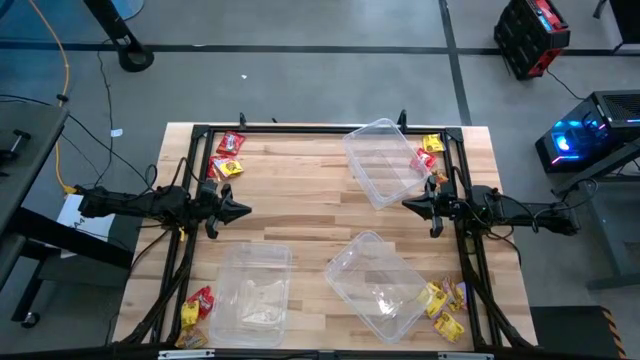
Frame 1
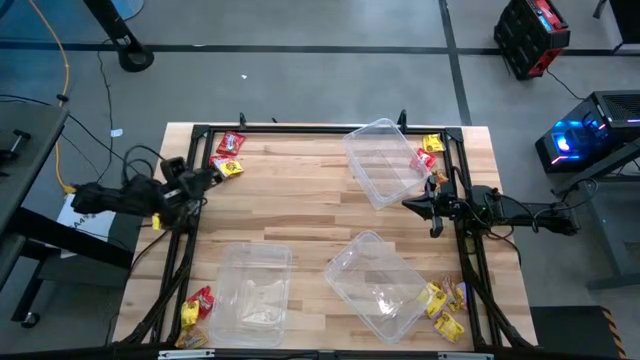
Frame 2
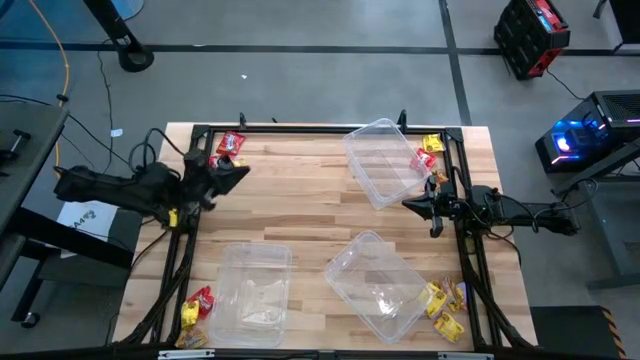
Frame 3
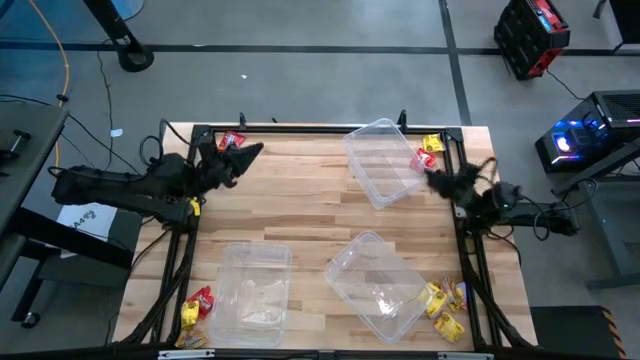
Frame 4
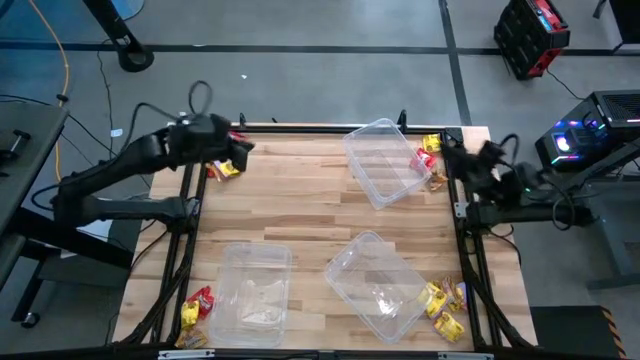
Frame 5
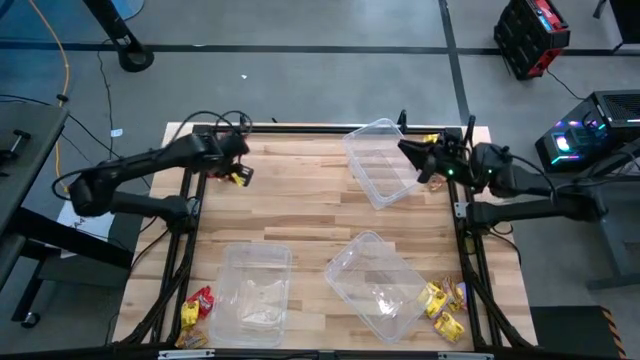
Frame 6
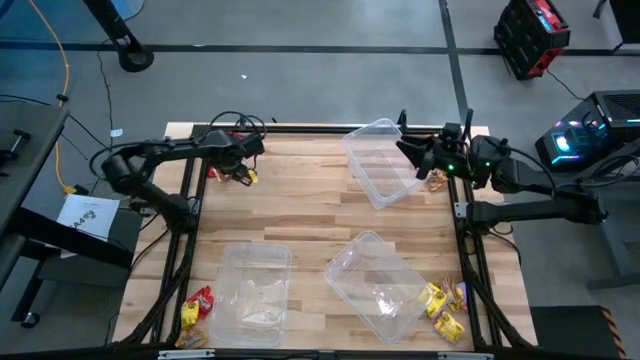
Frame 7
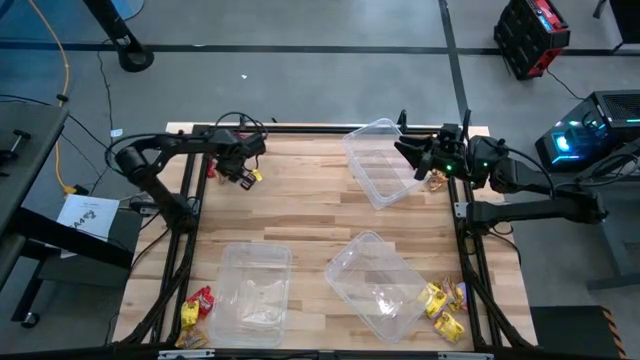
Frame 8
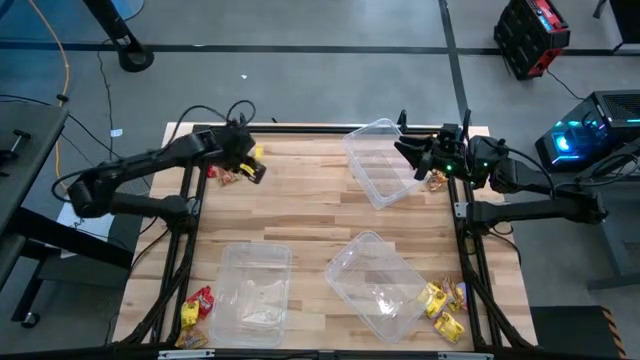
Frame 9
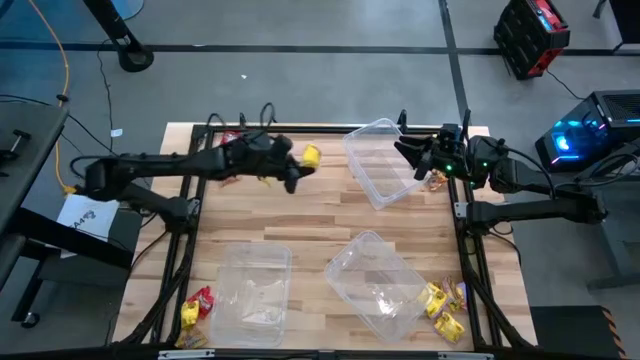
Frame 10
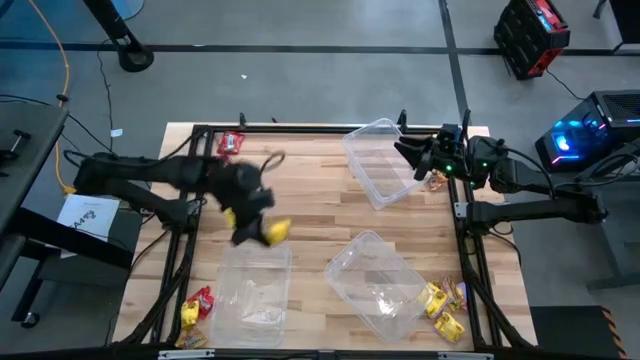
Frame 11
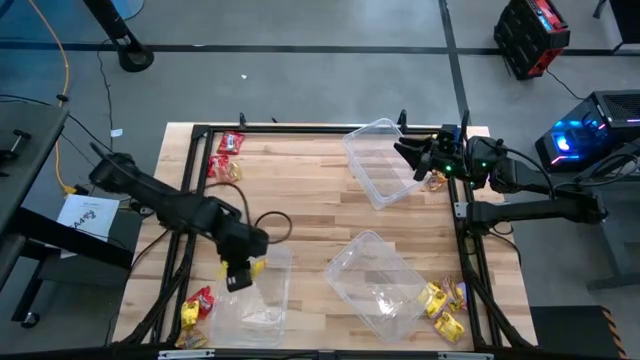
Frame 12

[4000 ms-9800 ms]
Task: Sort candy
Put the yellow candy into the bottom left transparent bin

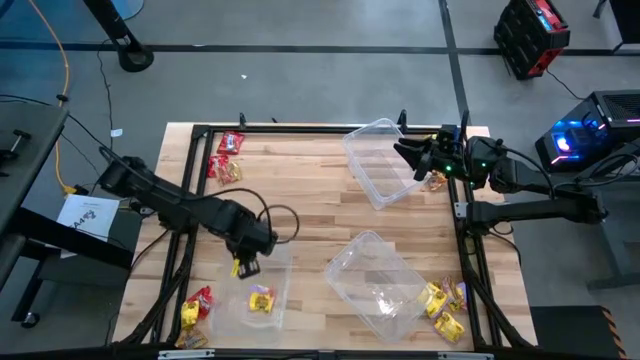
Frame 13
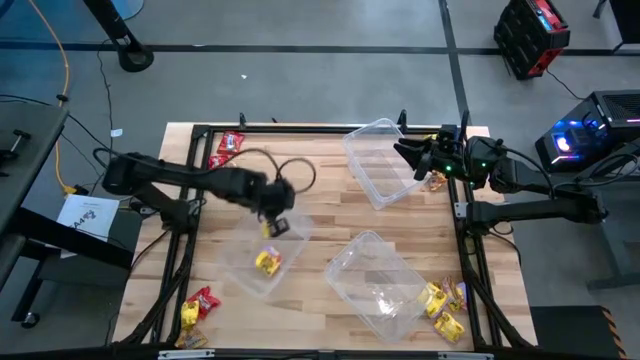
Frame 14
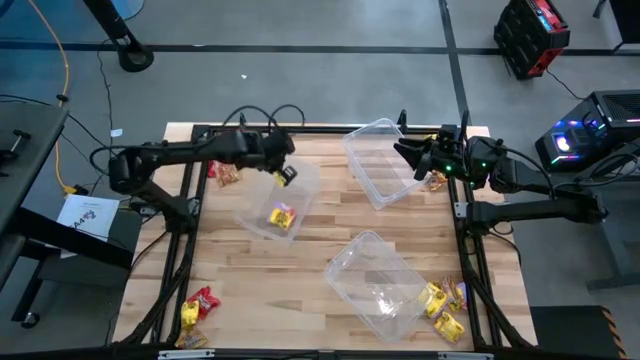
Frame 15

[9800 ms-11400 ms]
Move the bottom left transparent bin to the top left on the table

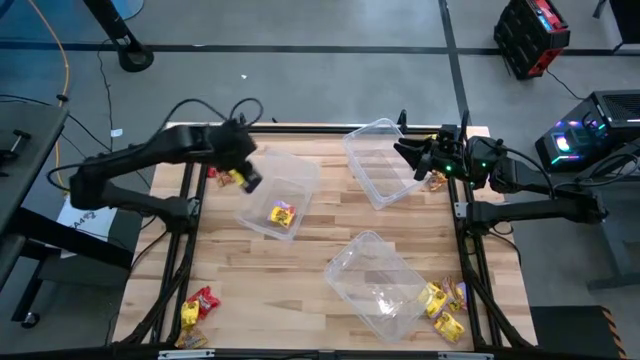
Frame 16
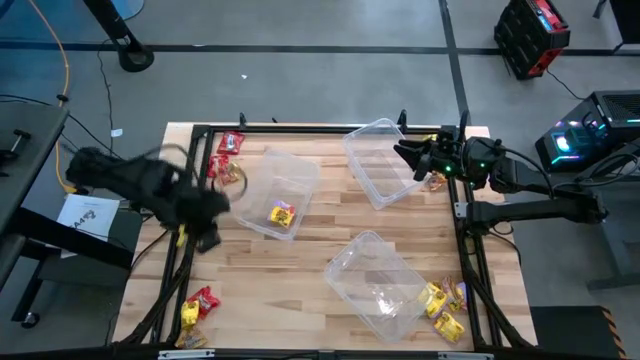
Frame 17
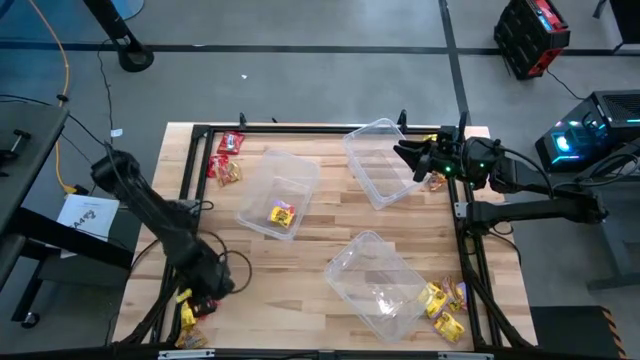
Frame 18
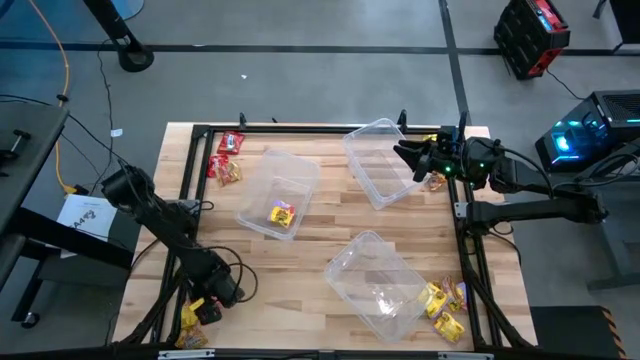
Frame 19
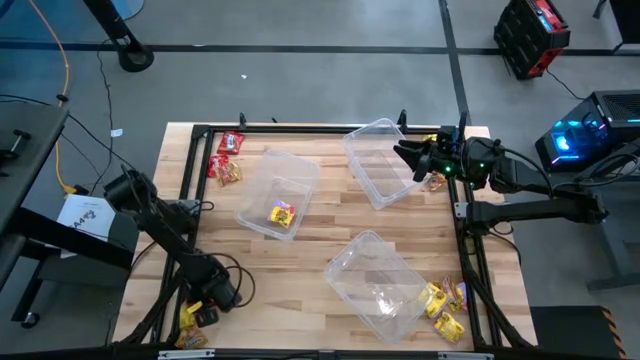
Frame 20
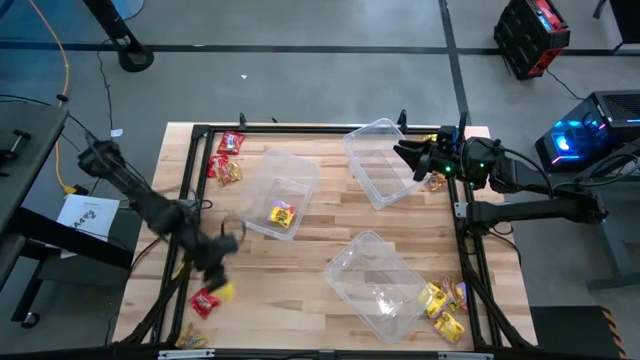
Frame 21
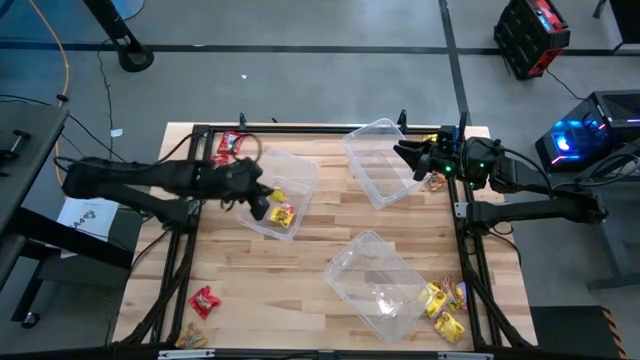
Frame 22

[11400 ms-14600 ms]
Put the yellow candy into the top left transparent bin

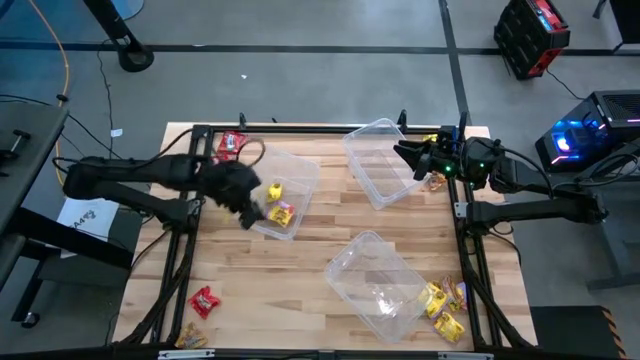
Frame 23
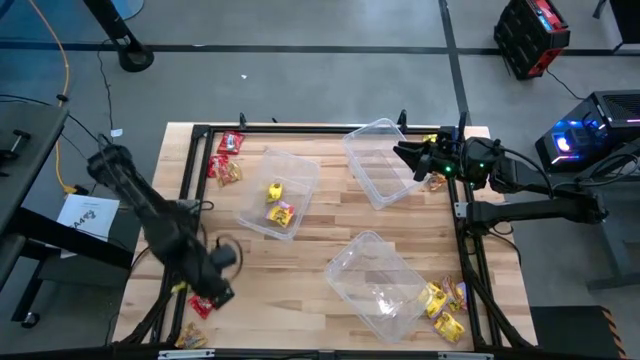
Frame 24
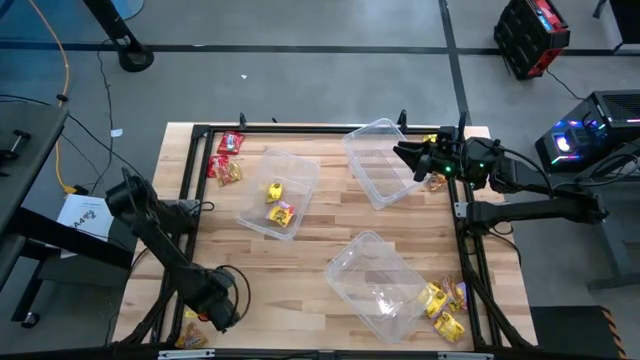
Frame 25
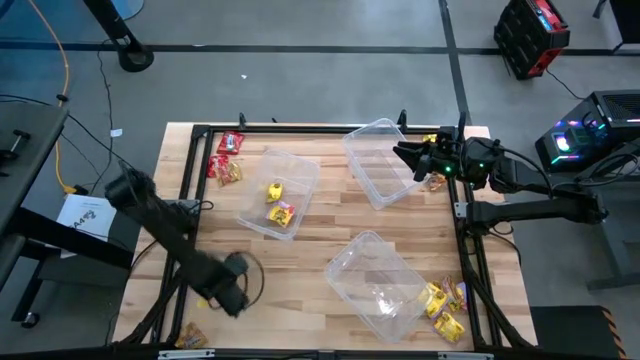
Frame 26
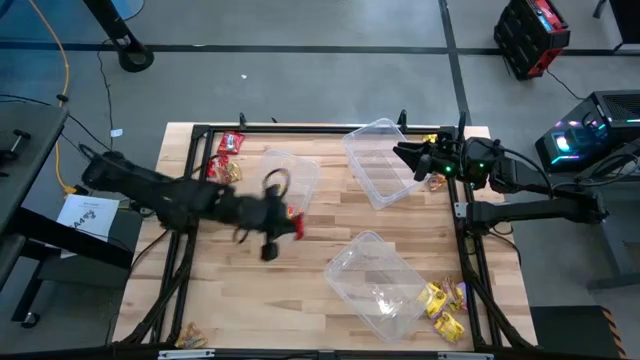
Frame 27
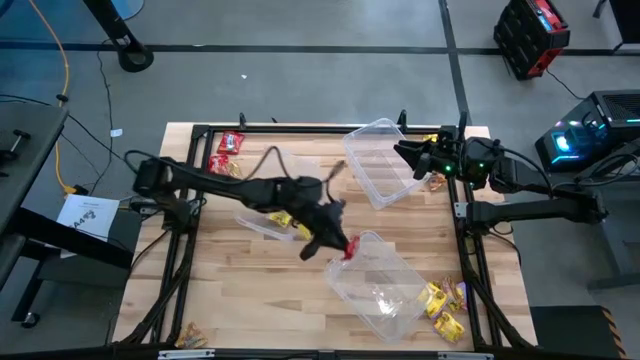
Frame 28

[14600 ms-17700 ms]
Put red candy into the bottom right transparent bin

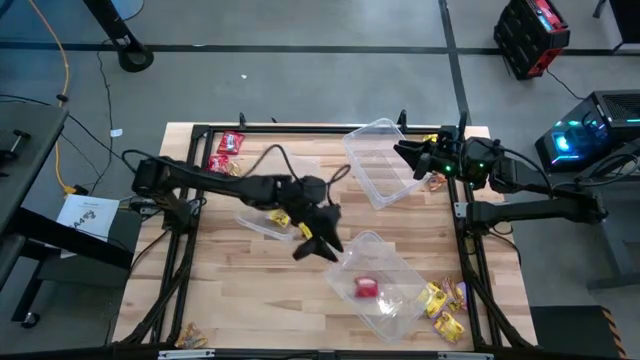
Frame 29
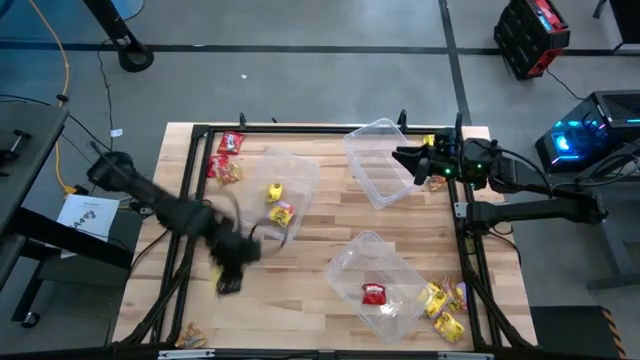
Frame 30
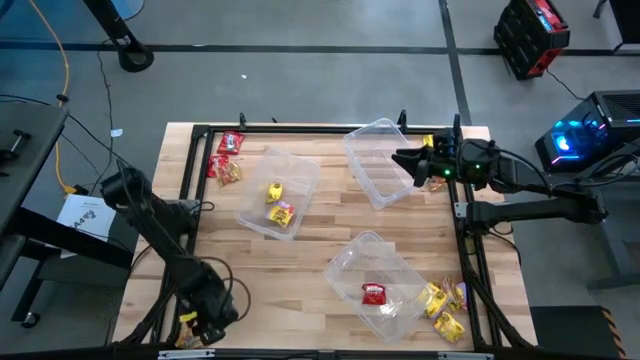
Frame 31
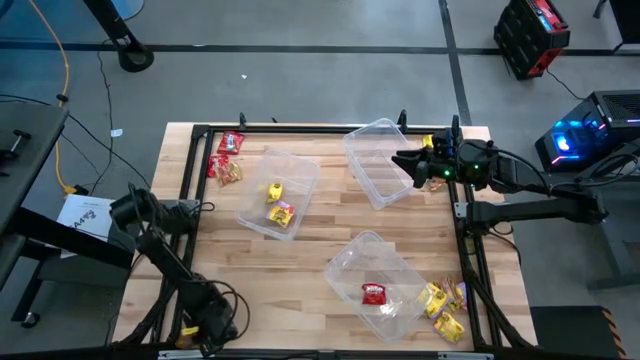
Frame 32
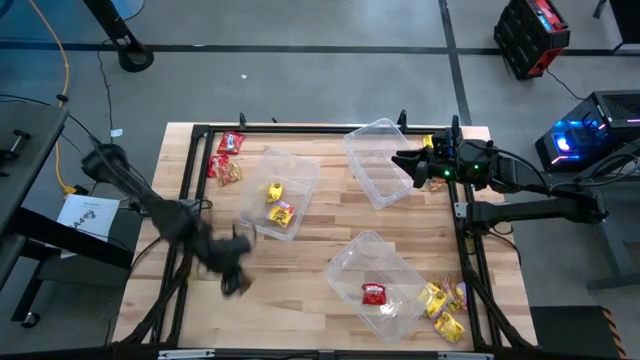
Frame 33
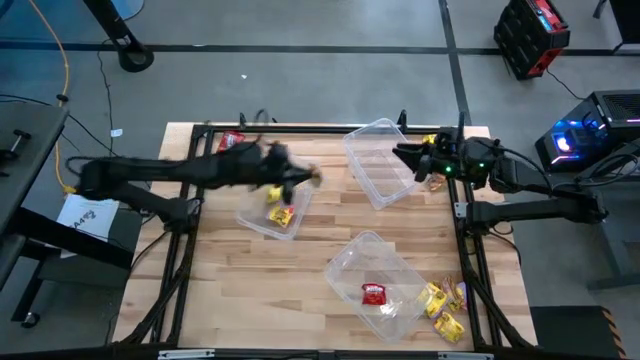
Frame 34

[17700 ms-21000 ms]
Put the brown candy into the top right transparent bin

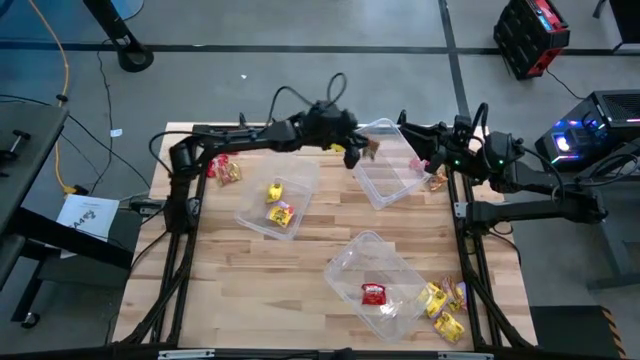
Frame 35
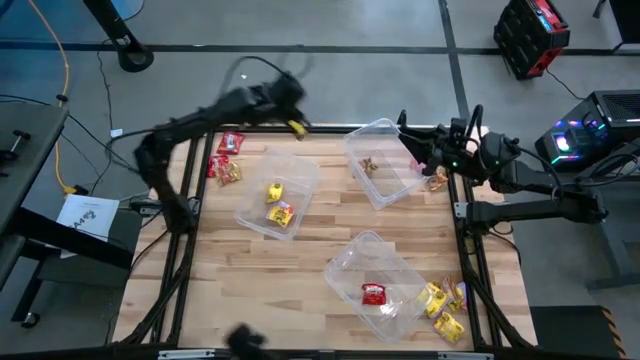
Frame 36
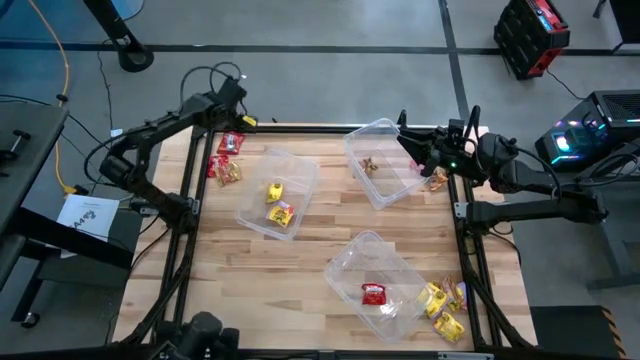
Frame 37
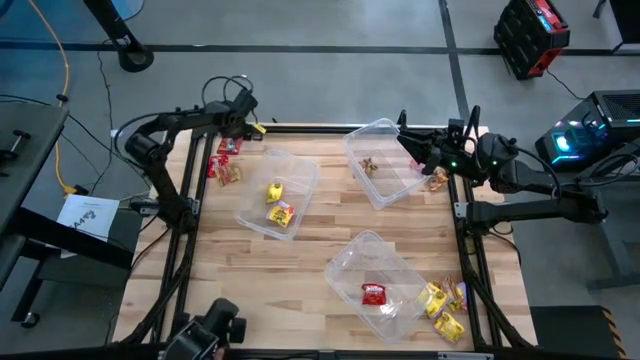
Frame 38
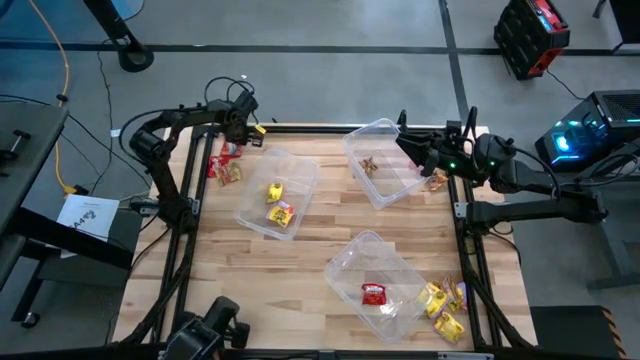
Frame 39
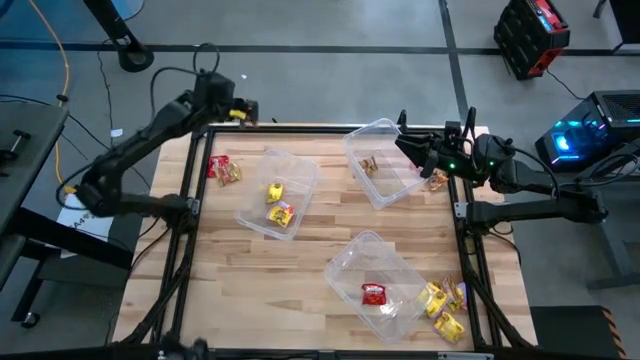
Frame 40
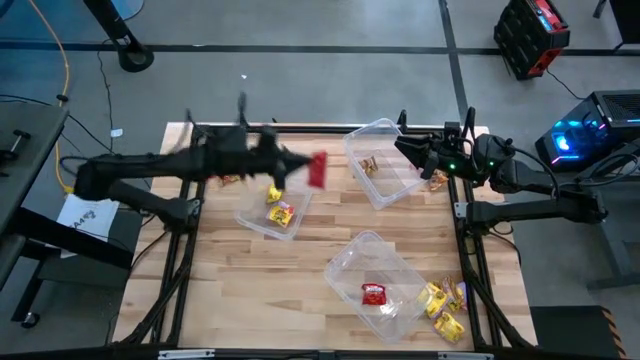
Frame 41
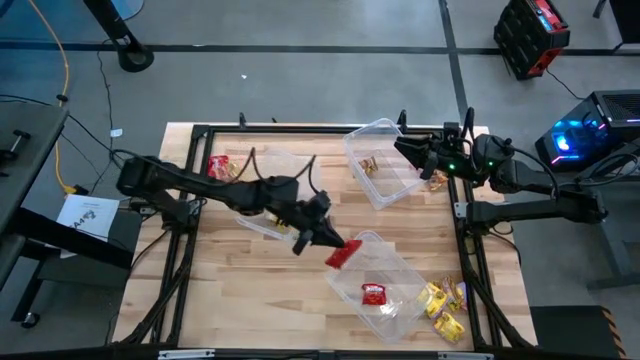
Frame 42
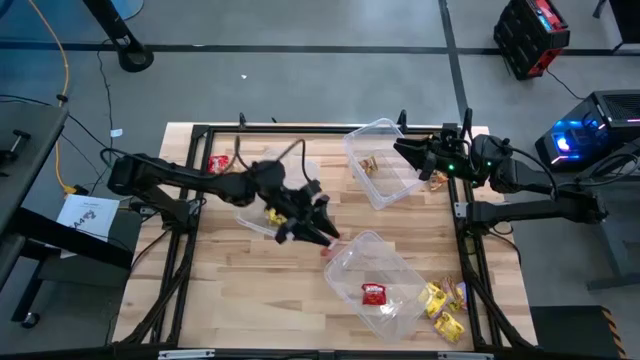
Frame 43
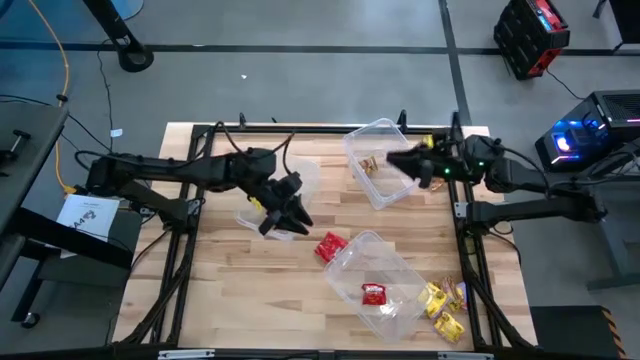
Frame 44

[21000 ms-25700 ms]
Put the red candy into the bottom right transparent bin
